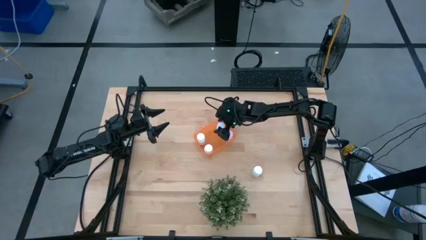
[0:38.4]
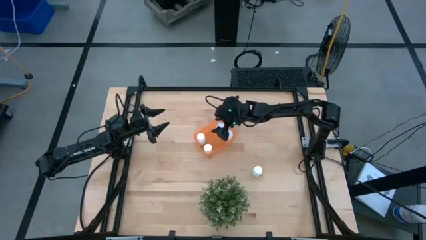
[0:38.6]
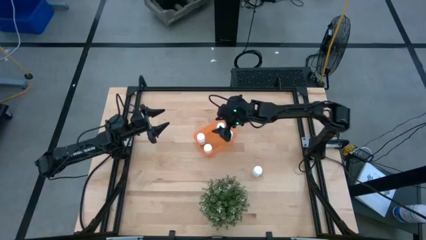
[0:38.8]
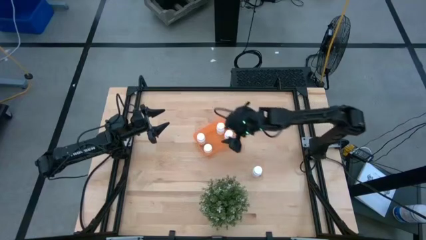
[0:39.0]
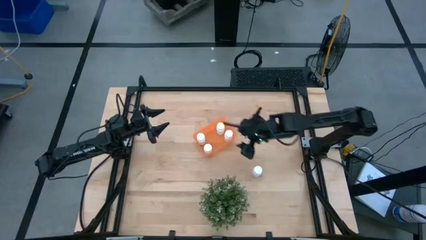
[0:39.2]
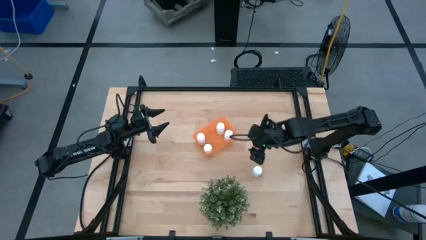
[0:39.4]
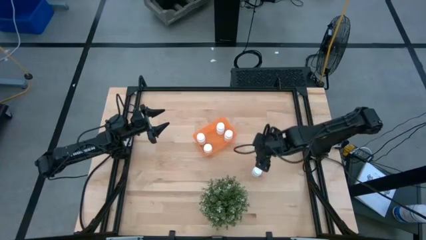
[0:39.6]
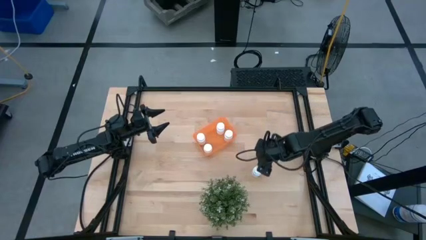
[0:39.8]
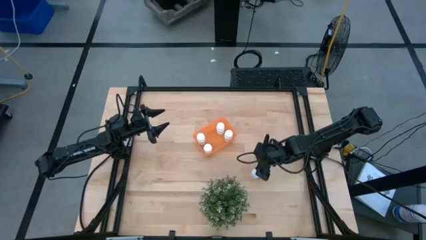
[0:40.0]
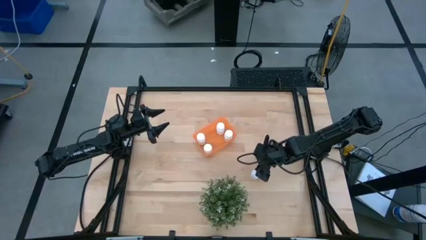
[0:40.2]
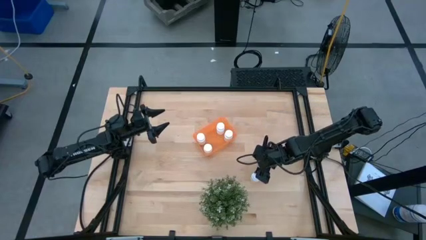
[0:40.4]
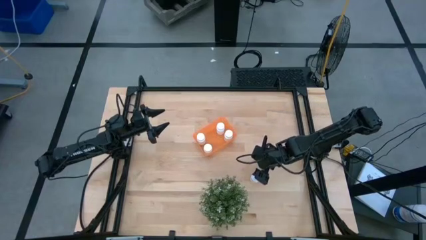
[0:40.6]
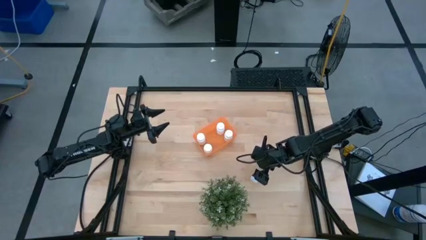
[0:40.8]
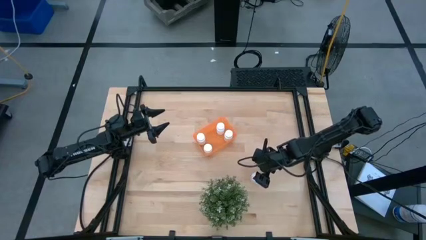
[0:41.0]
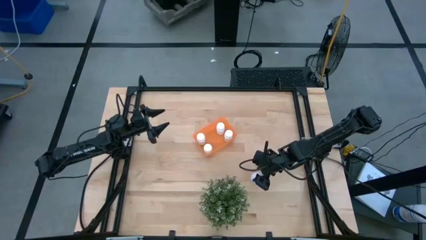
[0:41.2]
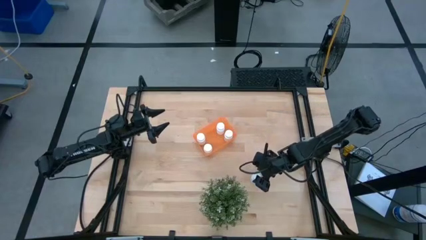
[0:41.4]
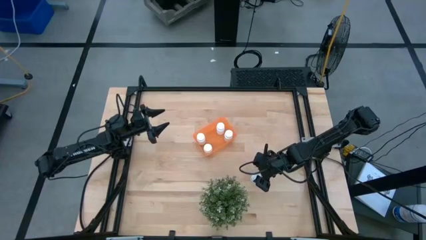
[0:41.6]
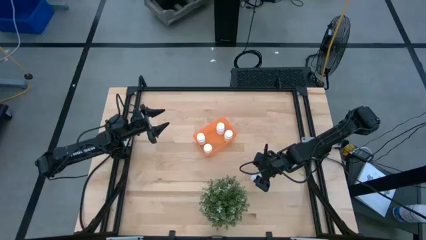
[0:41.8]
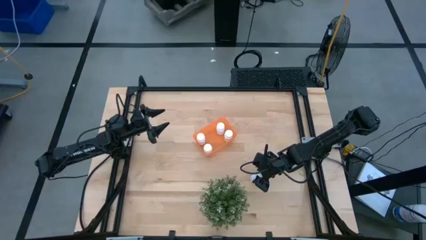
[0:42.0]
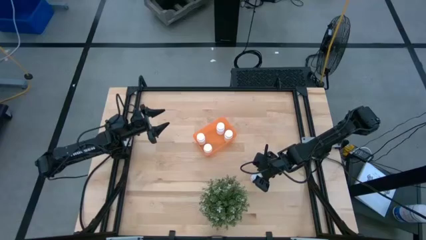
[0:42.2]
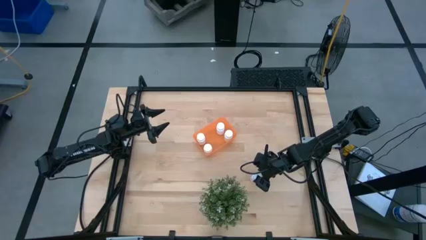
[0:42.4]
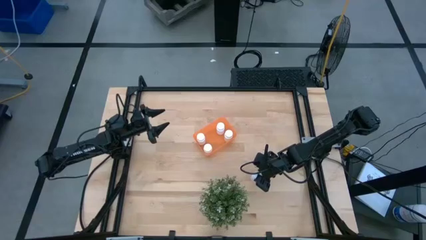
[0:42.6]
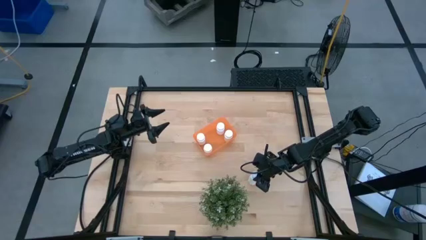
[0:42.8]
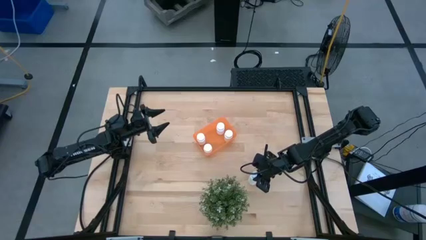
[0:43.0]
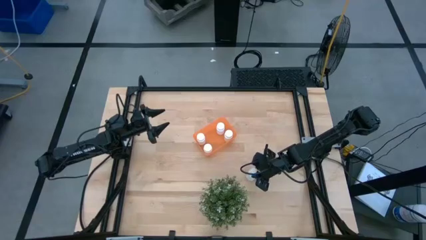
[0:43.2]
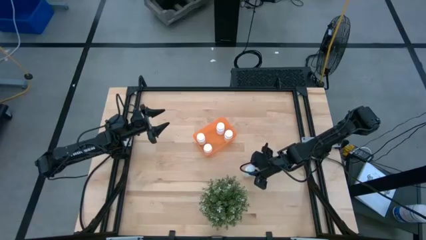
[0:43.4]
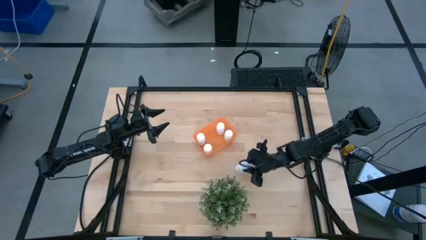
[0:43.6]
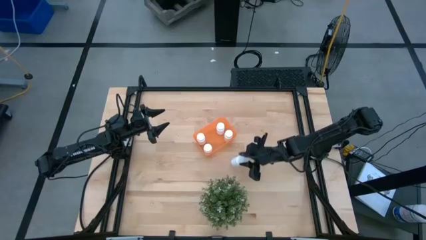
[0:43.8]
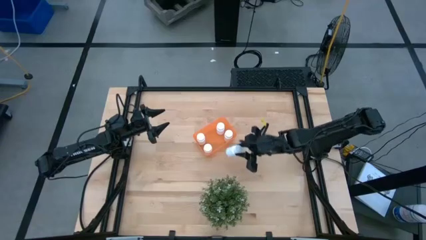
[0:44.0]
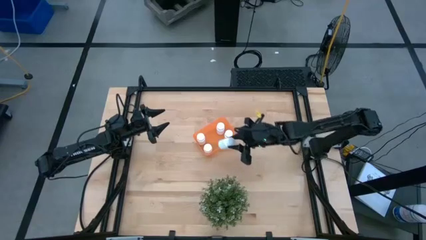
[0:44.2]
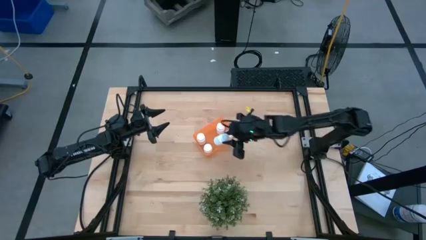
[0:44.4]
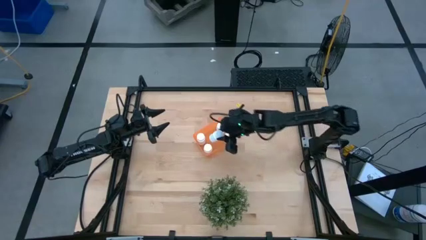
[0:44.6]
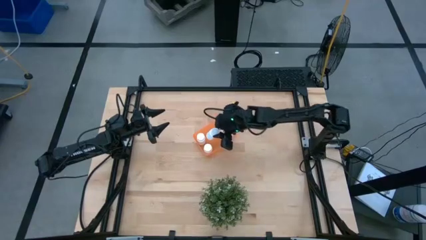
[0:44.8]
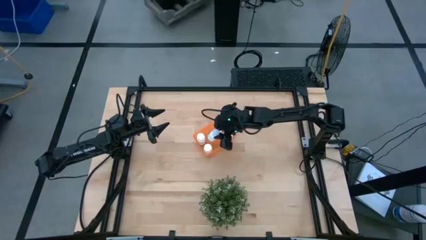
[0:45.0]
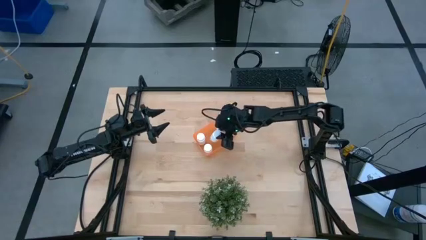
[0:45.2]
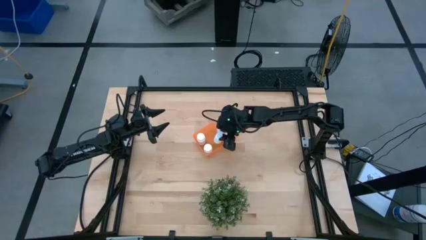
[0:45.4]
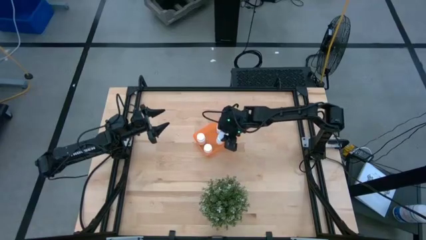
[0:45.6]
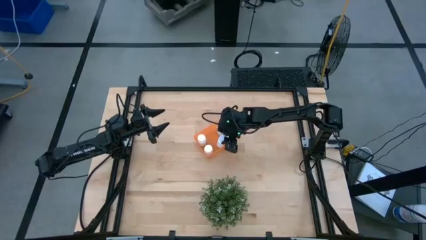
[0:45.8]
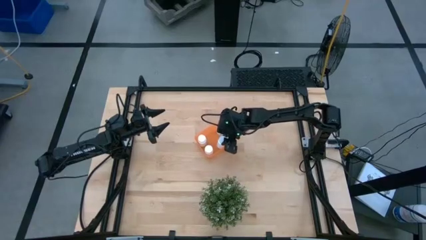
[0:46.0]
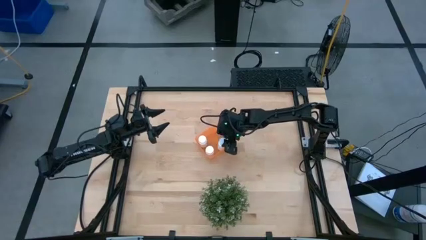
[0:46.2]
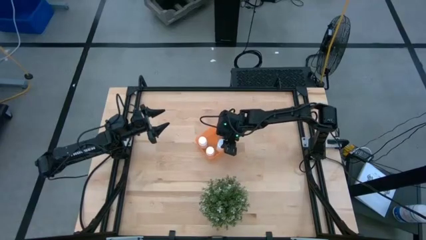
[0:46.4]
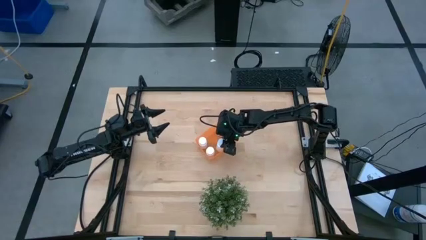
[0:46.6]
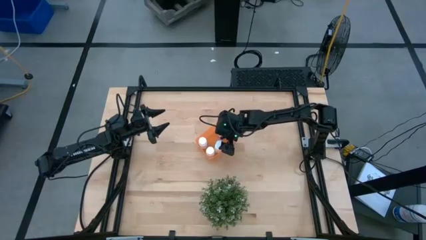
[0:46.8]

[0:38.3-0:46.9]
Task: Pick and place pill bottles into a basket
Put the white pill bottle into the orange bin

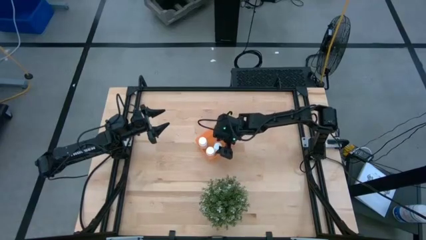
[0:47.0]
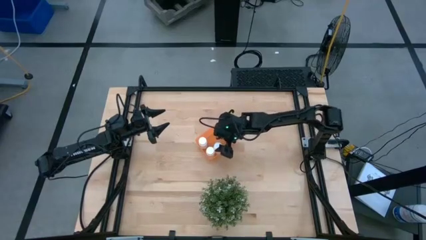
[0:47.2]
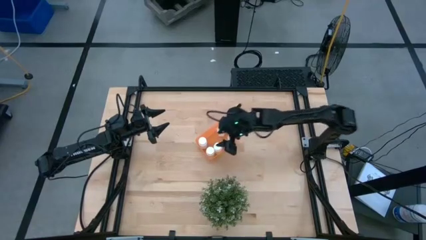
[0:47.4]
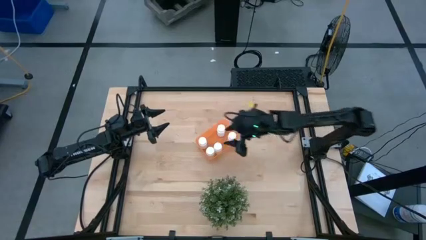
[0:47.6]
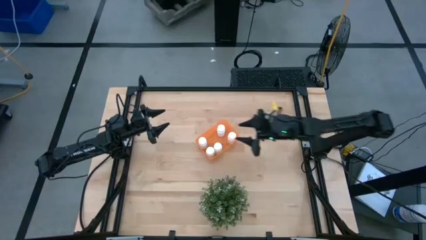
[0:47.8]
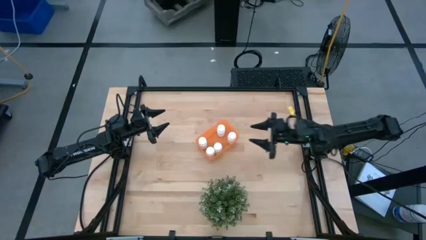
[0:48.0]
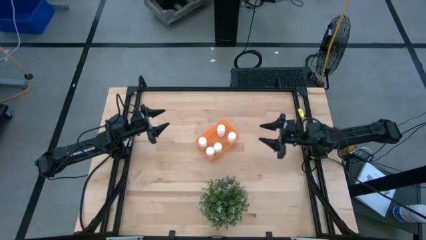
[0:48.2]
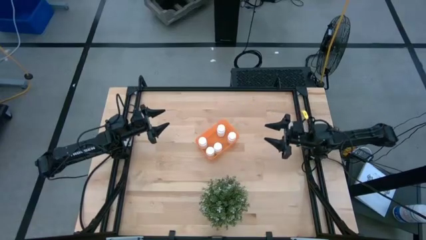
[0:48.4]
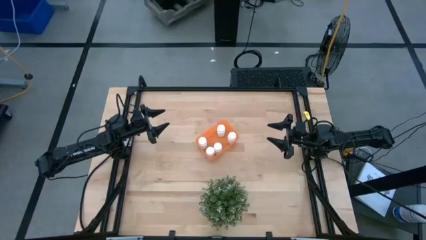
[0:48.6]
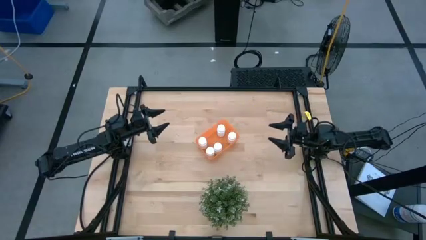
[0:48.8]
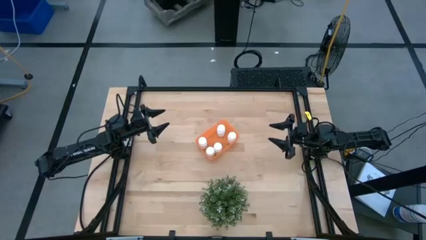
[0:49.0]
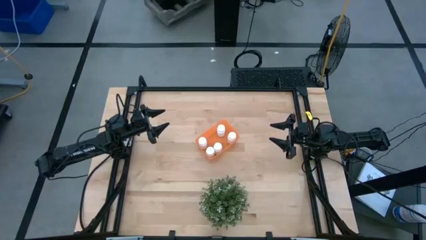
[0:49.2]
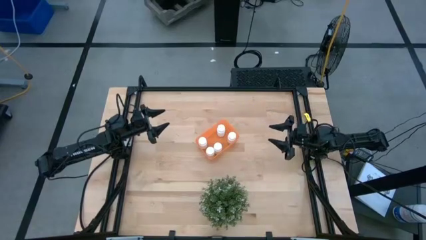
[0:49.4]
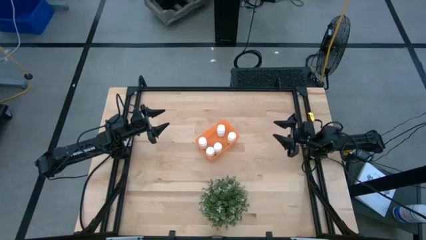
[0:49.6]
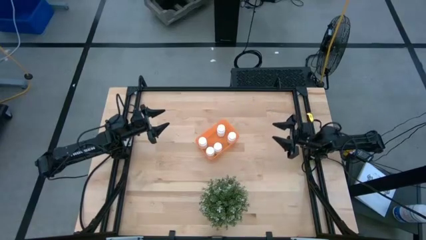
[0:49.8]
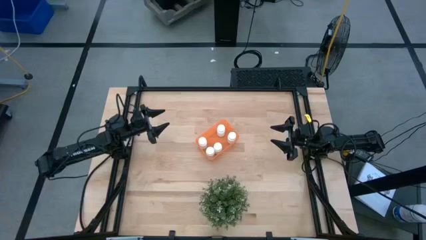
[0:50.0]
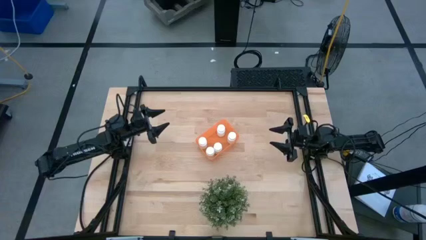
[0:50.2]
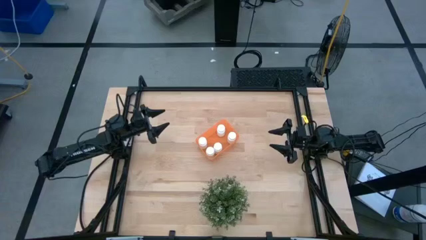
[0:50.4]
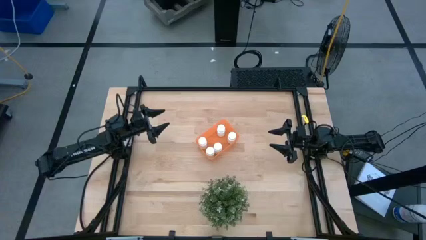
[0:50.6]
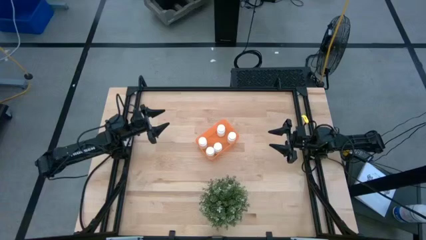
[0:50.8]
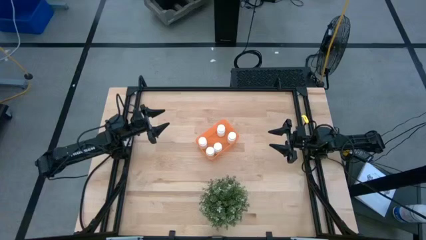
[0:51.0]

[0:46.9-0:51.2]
Return to Home Position

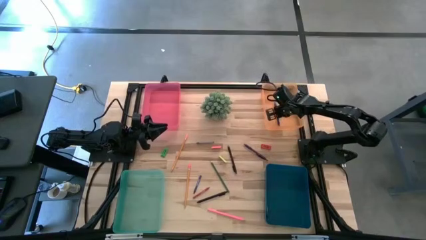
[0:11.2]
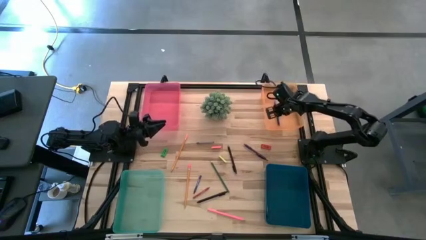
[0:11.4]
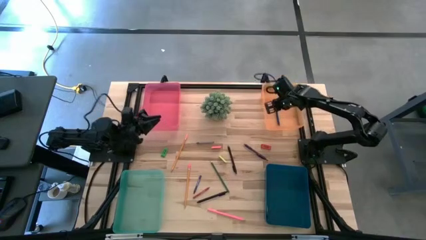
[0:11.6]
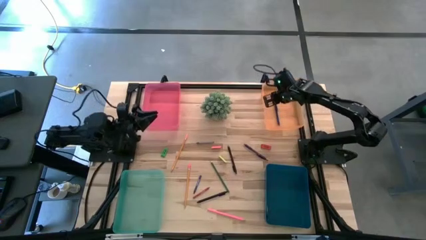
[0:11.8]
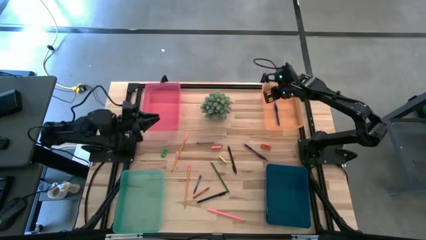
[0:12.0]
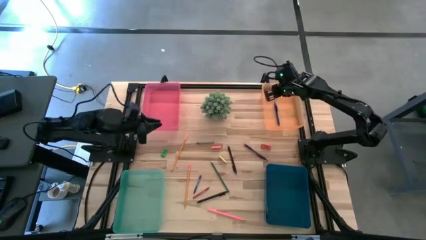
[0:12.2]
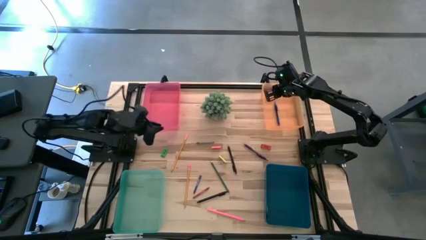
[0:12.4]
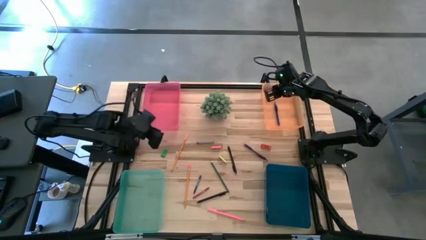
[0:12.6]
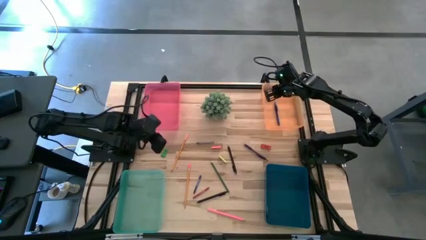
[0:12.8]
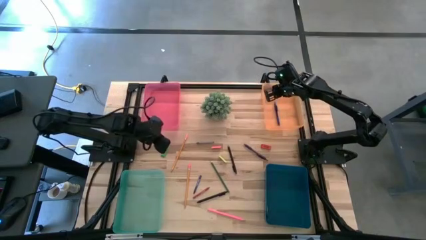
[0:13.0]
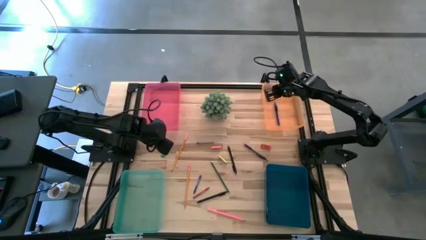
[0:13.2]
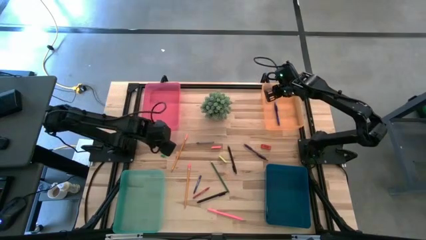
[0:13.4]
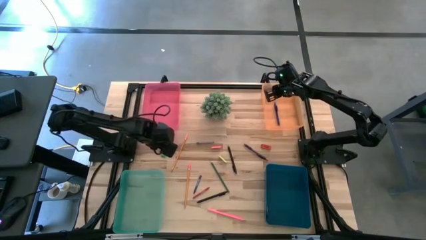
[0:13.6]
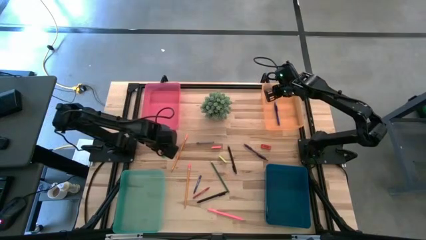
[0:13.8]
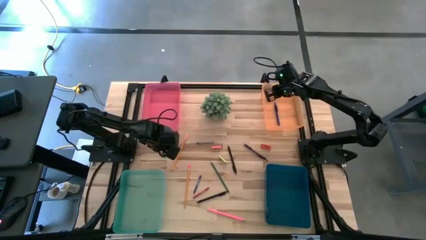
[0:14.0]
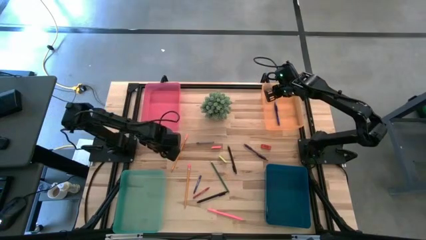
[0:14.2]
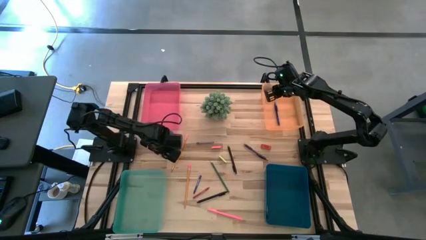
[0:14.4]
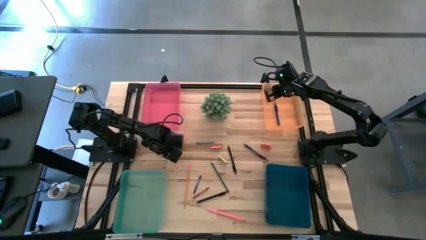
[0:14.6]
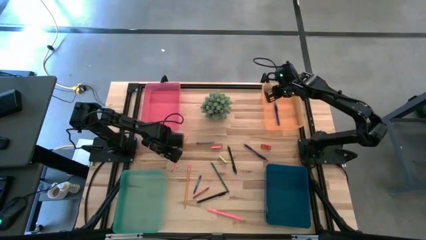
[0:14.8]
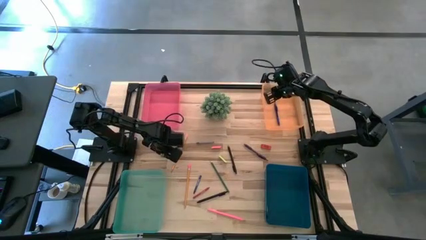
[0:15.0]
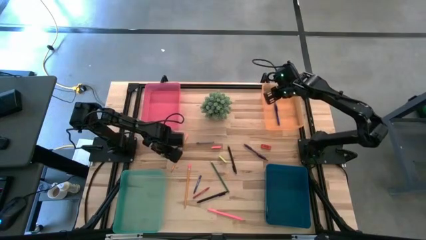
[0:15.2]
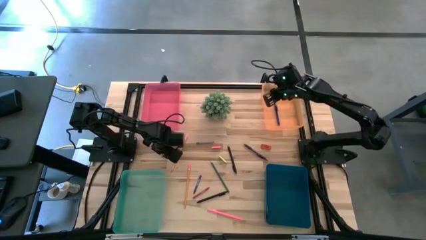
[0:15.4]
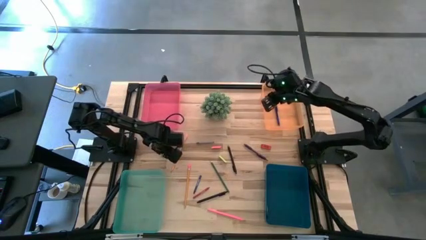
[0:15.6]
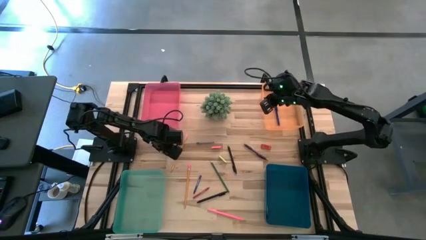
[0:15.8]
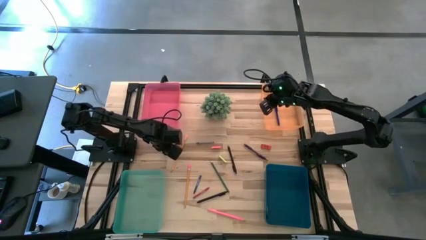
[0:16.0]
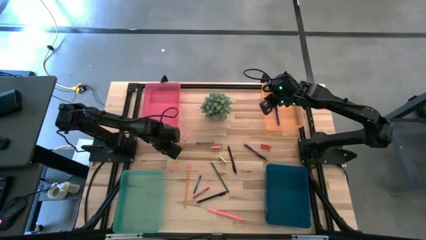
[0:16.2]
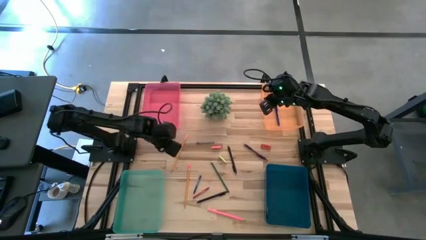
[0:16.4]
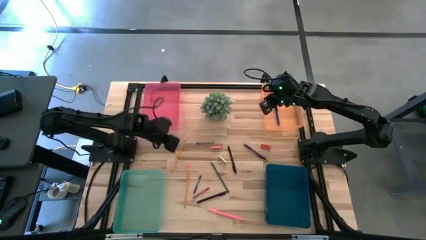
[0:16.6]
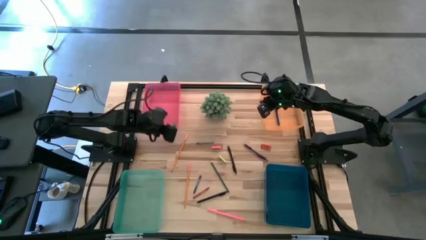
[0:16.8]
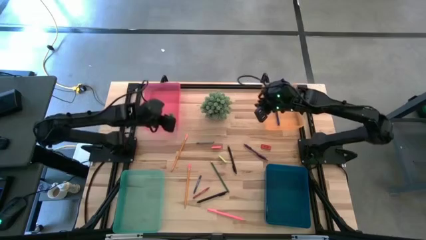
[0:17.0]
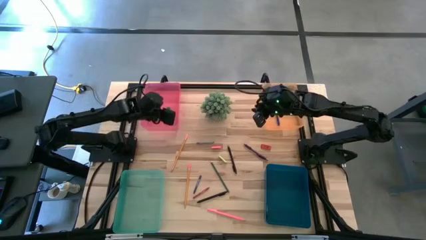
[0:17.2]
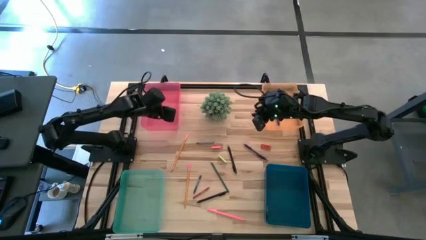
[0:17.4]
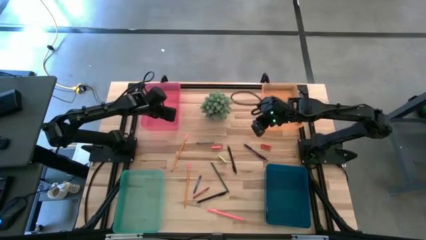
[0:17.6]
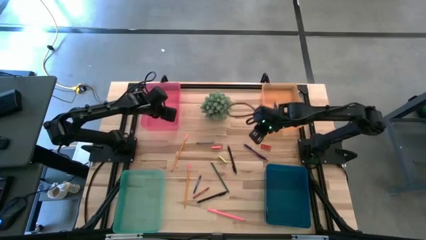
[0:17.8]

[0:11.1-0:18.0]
Task: Sort crayons/erasers/pens/pencils in bins
Put the green eraser into the red bin
